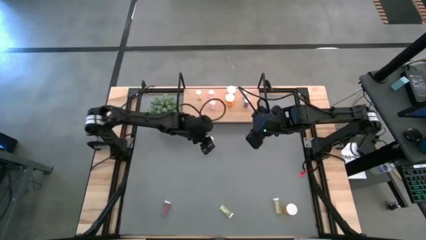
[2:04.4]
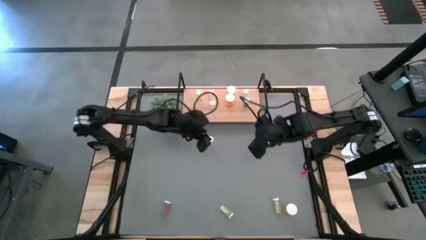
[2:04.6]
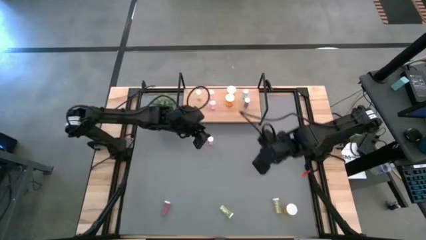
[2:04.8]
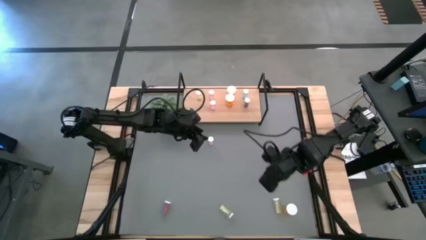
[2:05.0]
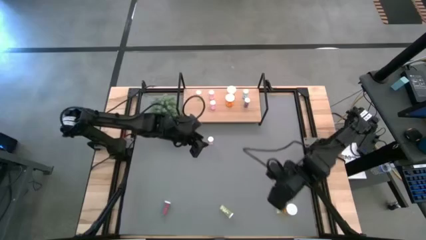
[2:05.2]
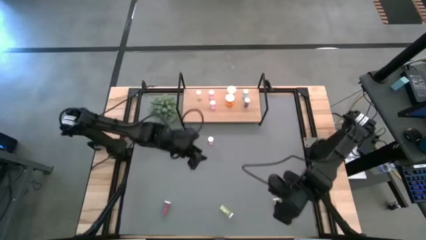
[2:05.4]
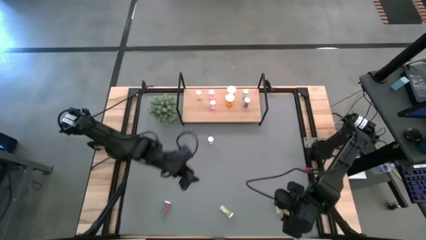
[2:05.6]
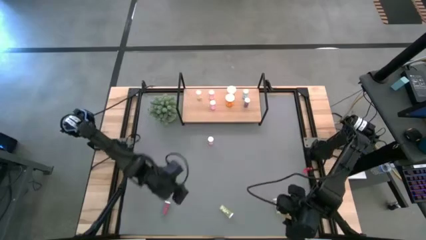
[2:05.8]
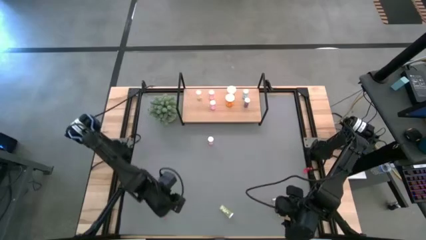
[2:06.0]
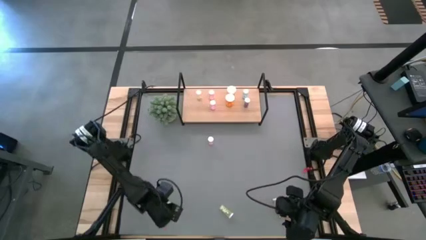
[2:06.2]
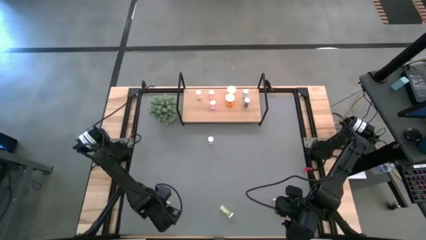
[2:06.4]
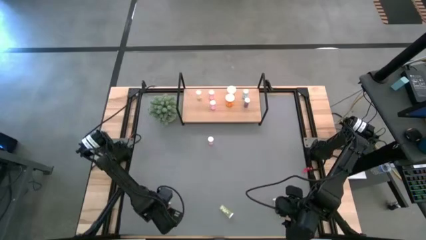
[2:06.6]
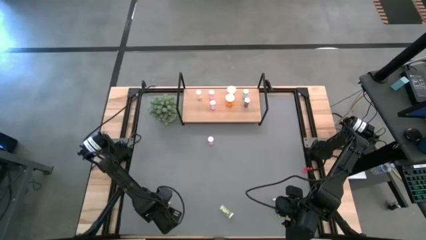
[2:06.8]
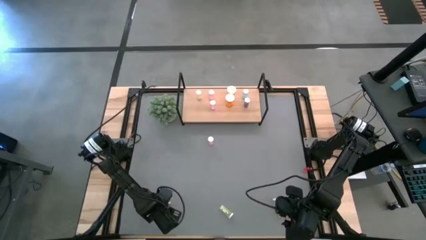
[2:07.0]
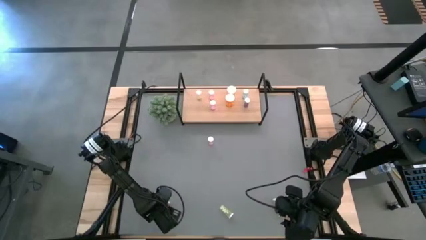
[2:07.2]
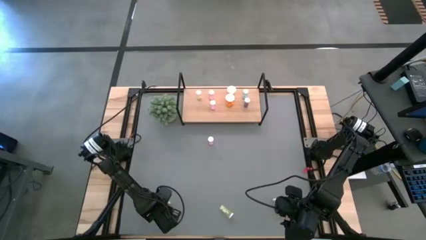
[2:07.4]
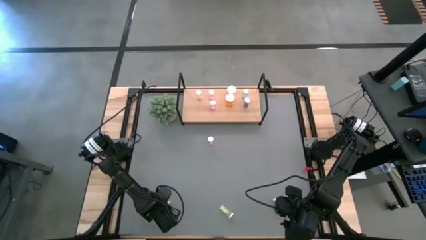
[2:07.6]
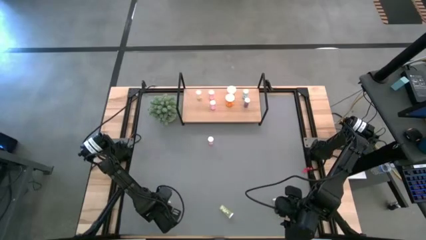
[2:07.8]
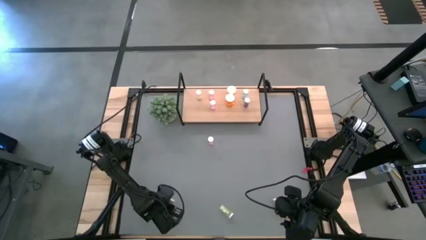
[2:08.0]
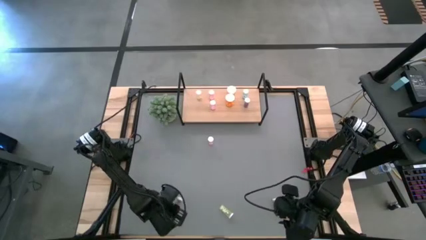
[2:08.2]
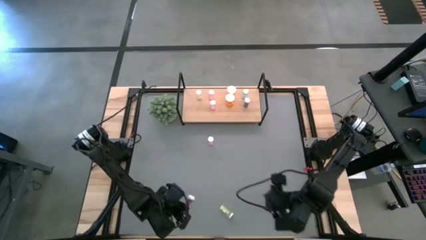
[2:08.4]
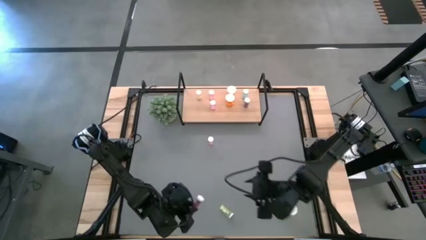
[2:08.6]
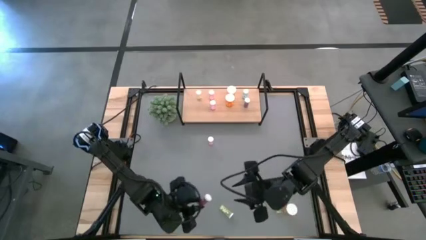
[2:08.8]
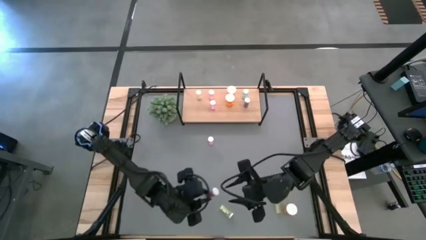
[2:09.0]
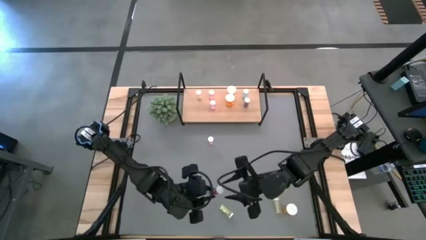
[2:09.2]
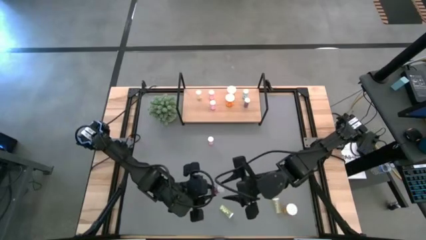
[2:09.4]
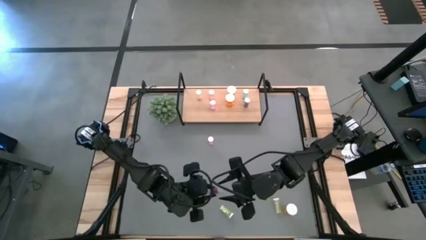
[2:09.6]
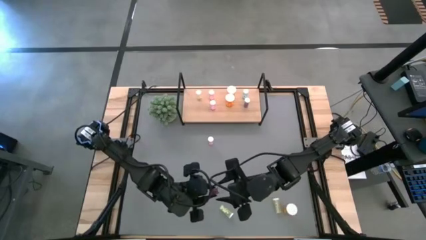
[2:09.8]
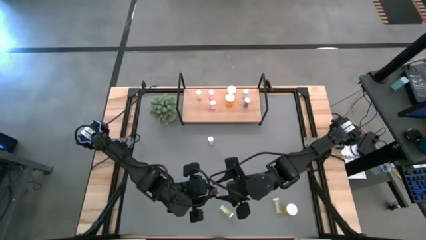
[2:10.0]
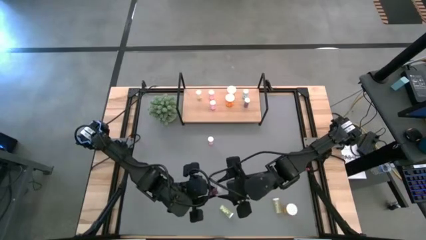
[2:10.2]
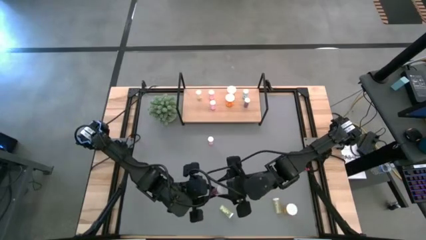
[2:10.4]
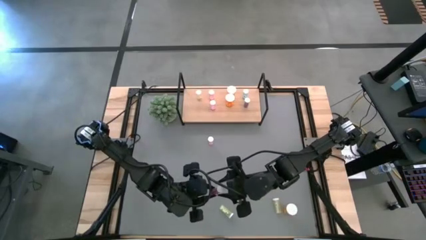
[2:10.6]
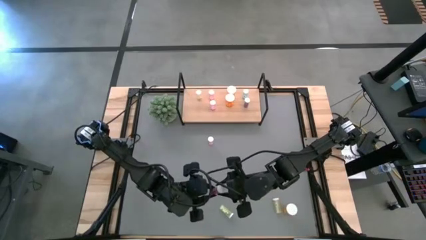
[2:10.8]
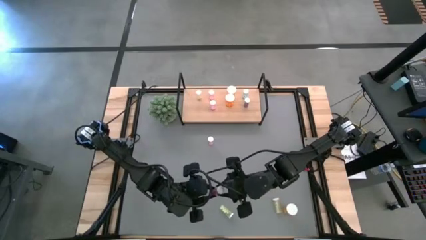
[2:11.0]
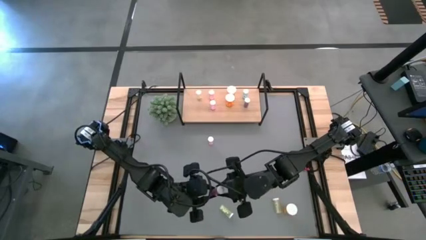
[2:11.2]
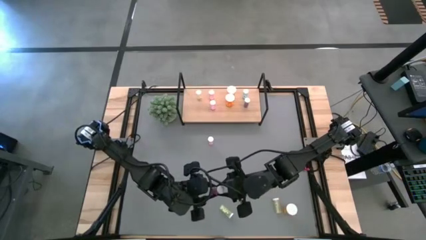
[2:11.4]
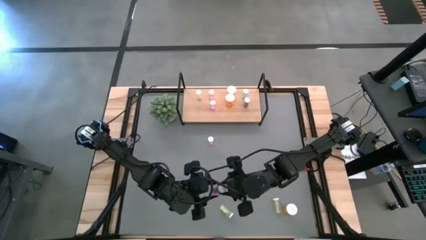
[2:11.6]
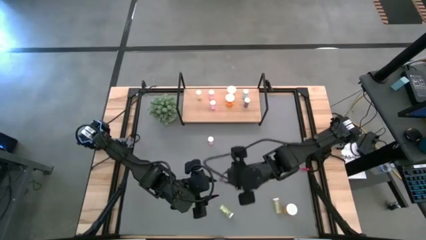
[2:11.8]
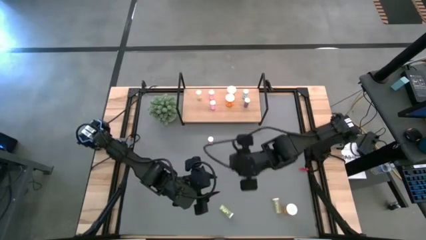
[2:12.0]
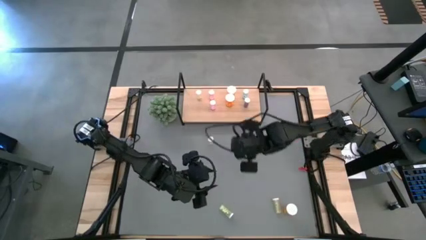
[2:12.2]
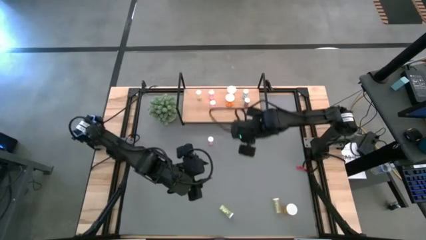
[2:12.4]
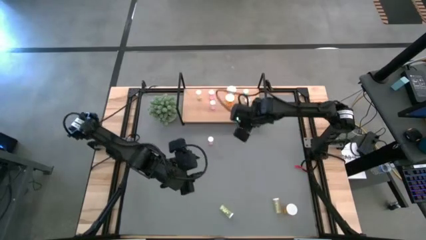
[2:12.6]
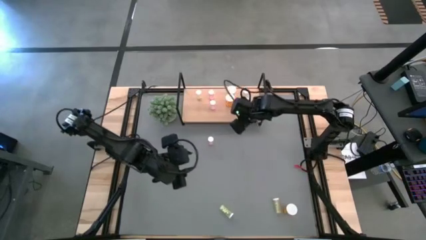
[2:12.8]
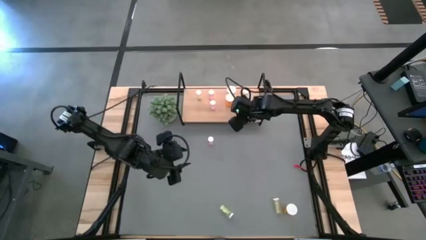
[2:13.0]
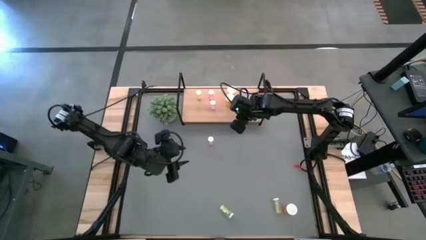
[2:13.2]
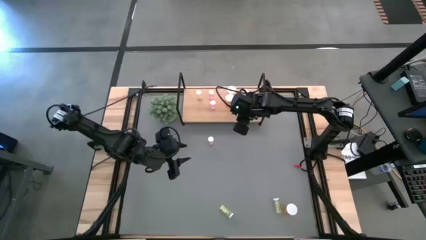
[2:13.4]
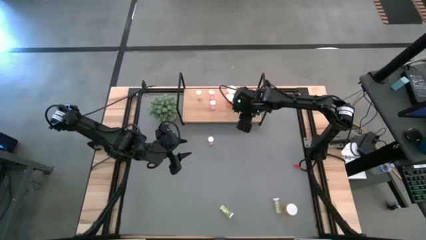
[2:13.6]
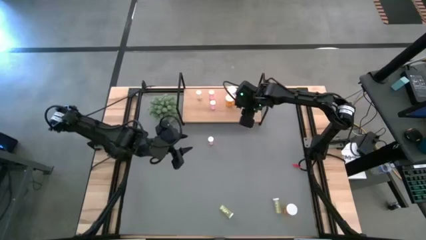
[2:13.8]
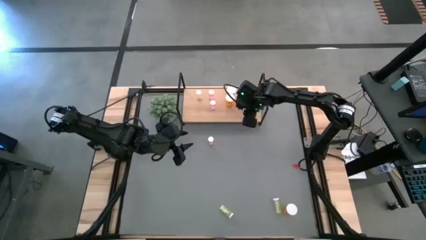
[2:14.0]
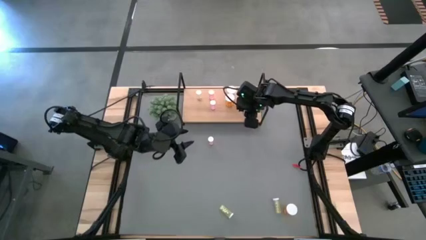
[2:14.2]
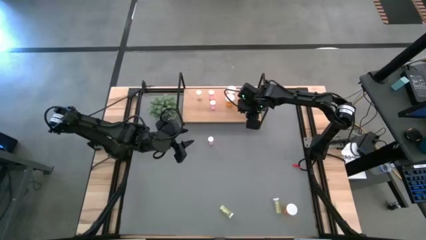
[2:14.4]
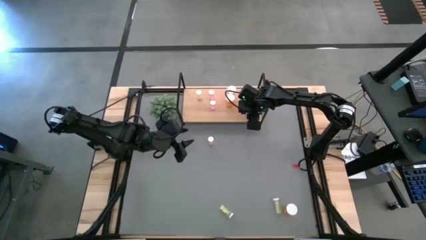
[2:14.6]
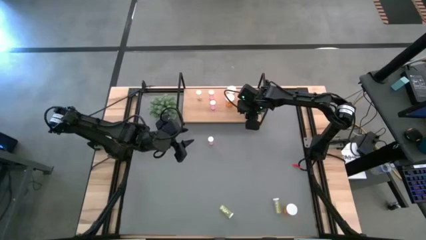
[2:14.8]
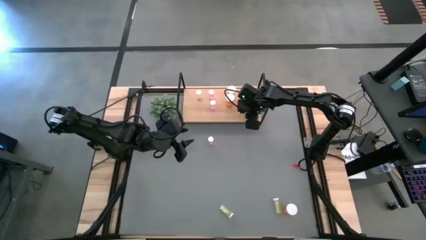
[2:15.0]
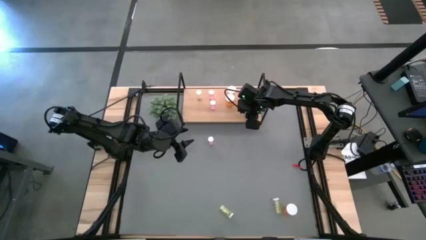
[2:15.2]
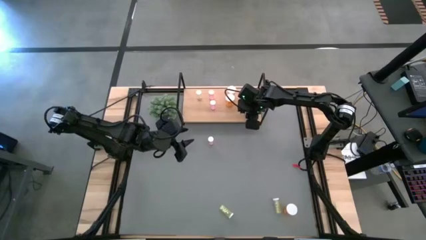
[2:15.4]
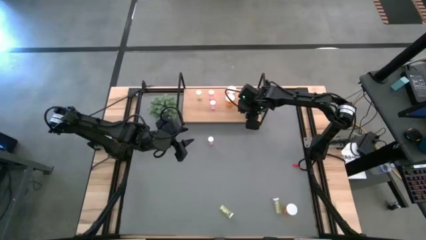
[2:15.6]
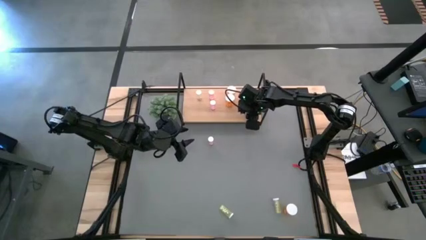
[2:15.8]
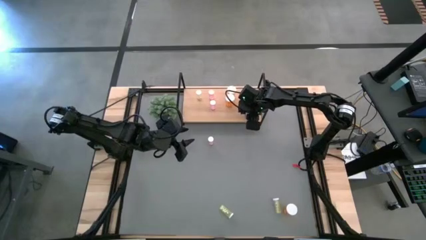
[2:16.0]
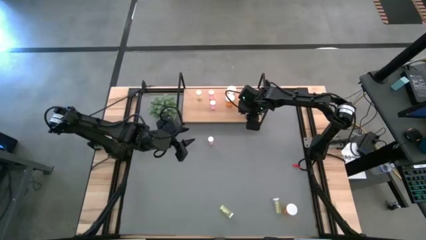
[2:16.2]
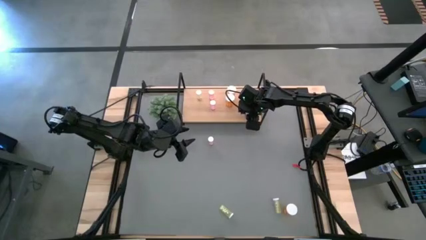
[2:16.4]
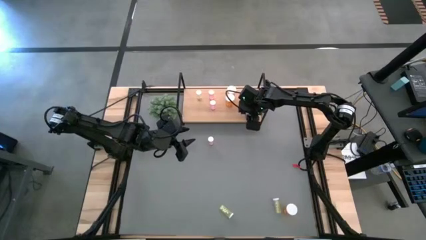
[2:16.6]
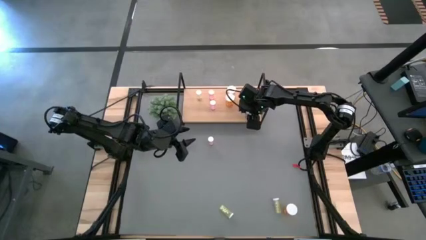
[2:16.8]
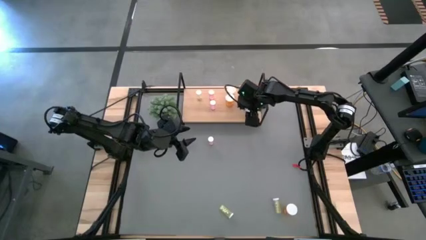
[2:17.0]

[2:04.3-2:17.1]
Task: Pick and place medicine bottles onto shelf by color
Put the blue pill bottle on the shelf aligned with the other blue pill bottles

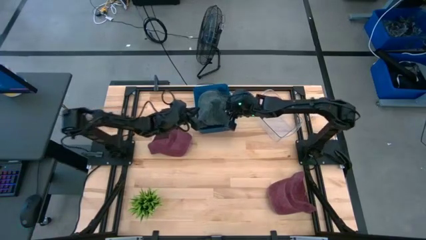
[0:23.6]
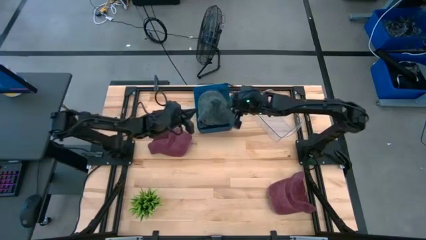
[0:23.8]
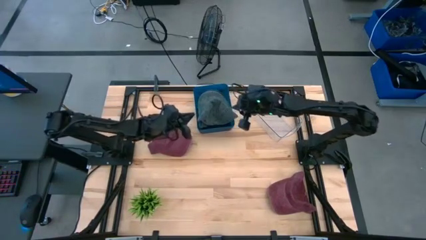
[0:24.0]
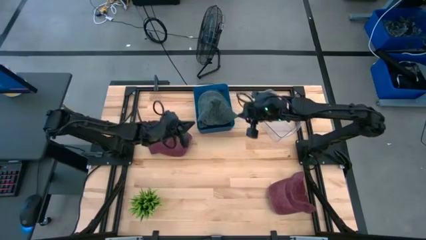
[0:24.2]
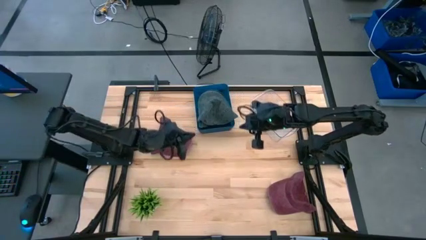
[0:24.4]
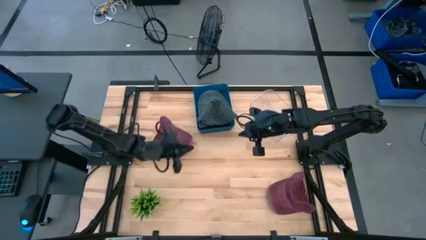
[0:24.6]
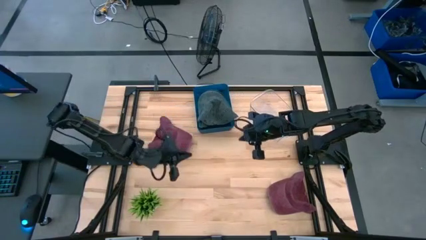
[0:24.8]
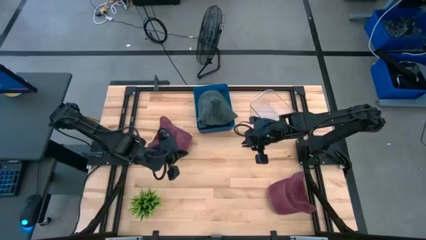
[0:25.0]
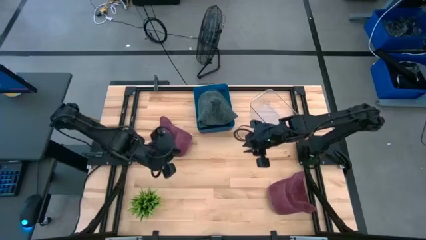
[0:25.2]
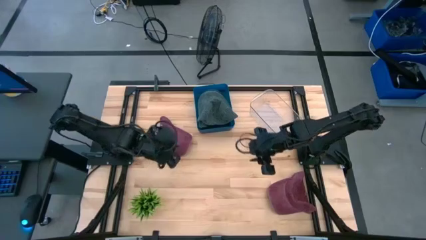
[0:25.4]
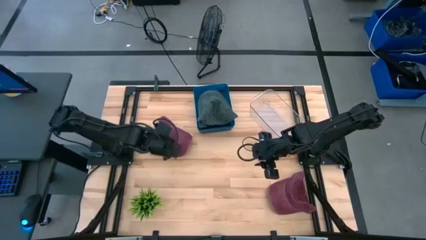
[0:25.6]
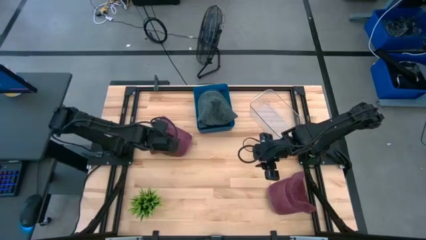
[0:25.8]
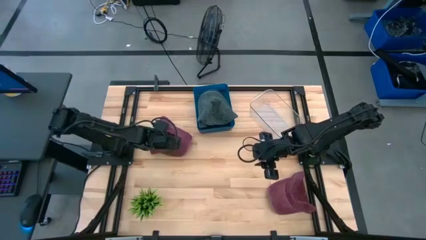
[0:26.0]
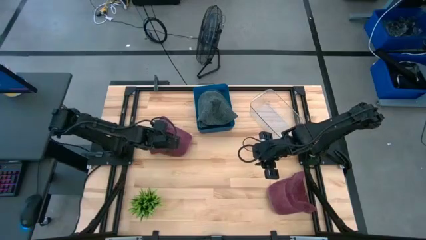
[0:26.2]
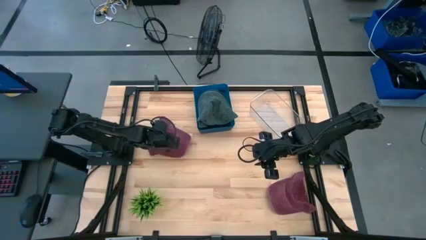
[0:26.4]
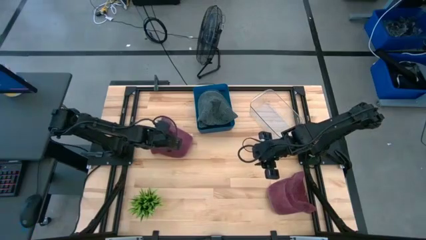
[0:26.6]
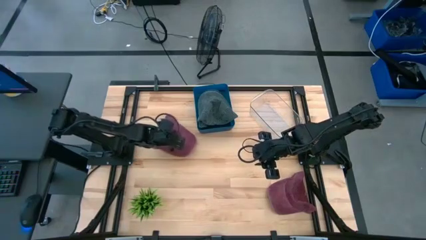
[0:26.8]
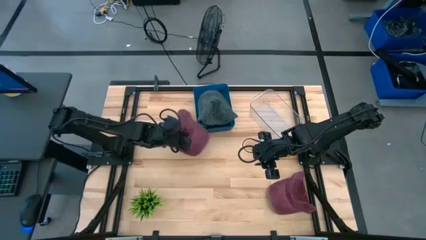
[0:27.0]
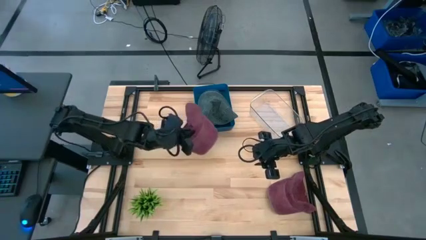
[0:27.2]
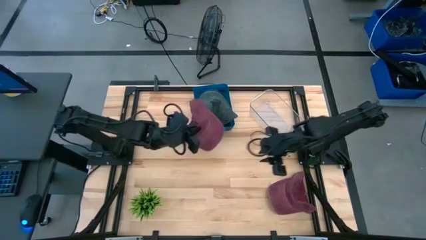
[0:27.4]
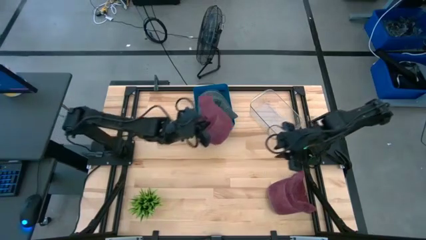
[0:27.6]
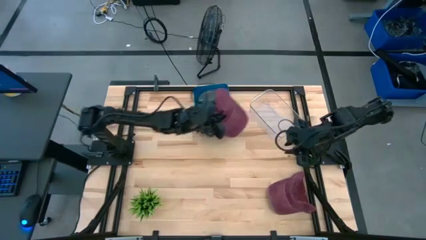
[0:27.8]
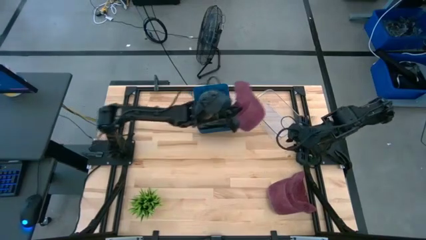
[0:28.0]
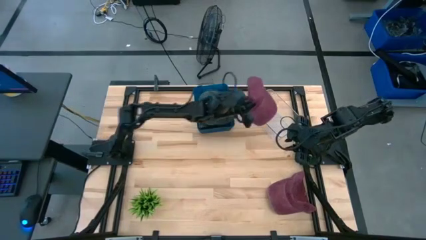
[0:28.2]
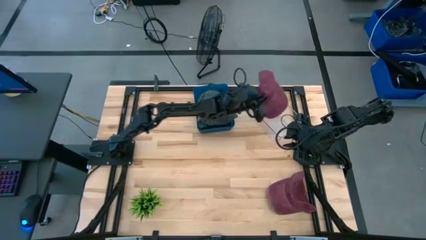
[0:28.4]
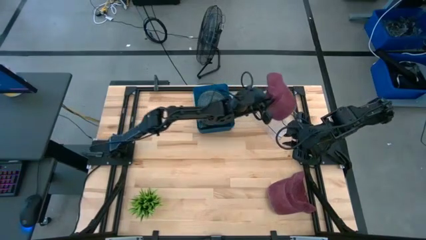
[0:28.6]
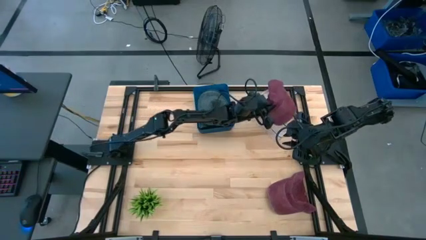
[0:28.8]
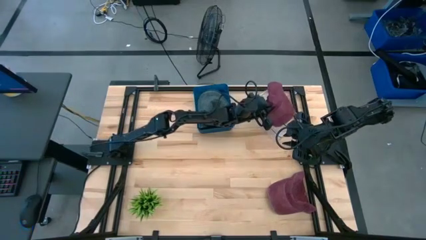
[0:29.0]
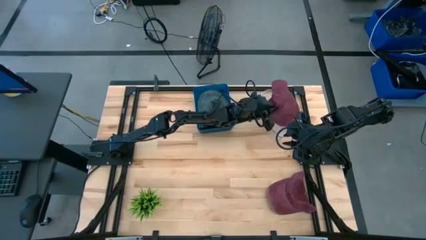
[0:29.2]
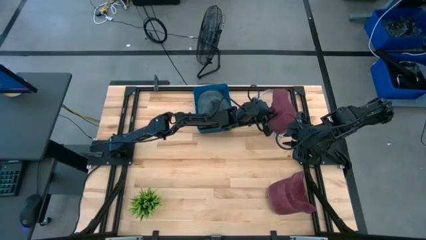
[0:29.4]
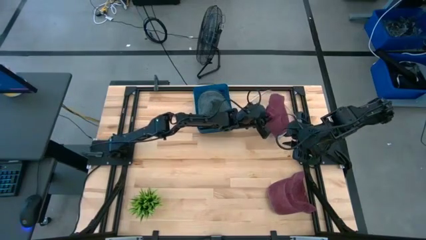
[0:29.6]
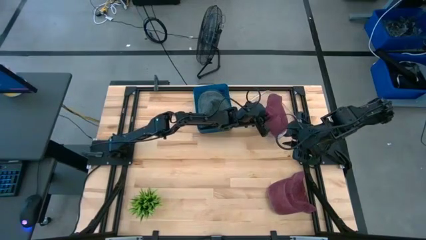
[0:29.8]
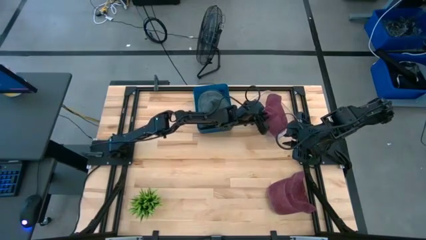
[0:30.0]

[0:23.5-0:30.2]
Task: Pick & Place hat
Put the left red cap into the transparent bin
